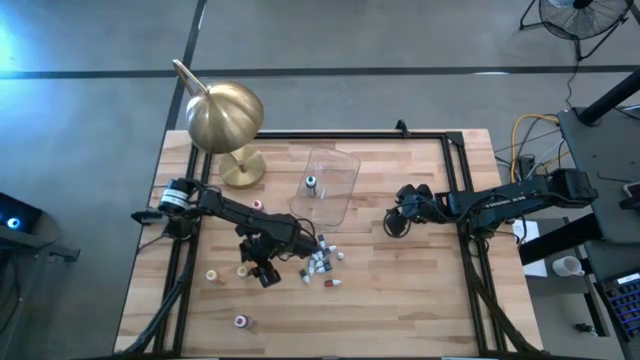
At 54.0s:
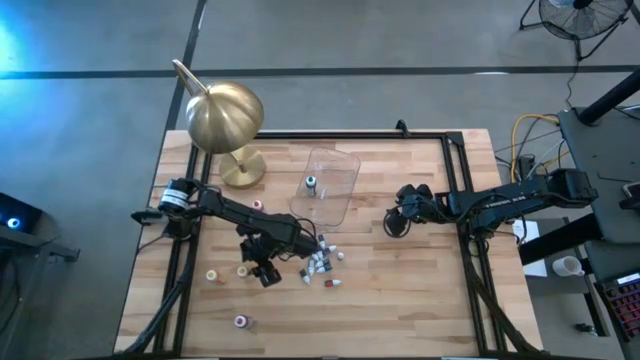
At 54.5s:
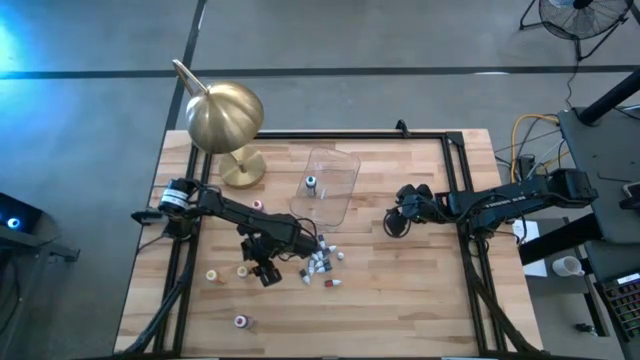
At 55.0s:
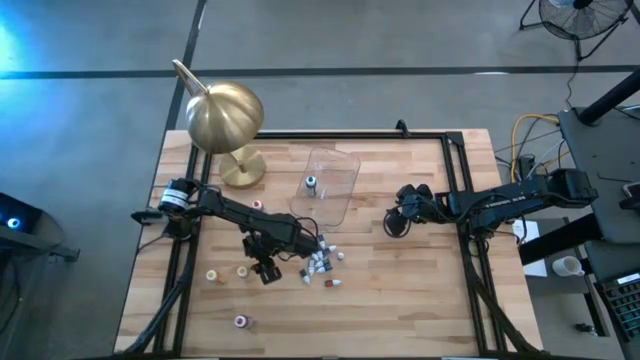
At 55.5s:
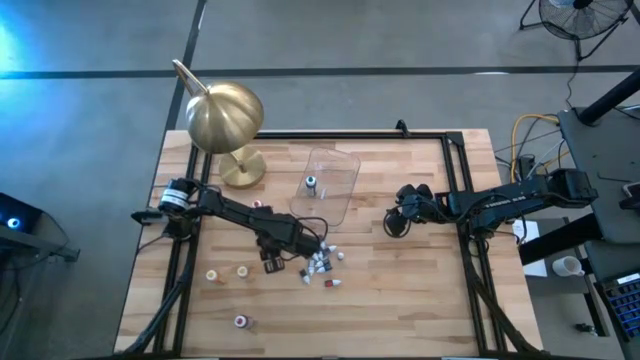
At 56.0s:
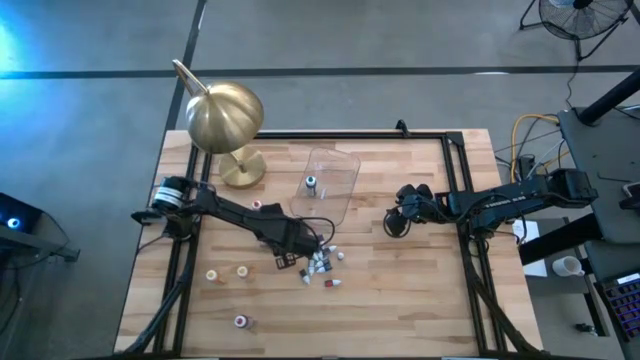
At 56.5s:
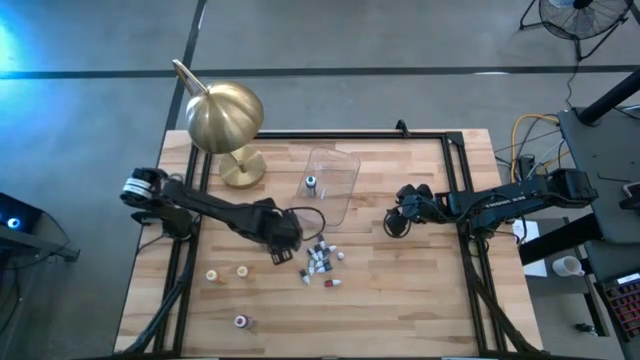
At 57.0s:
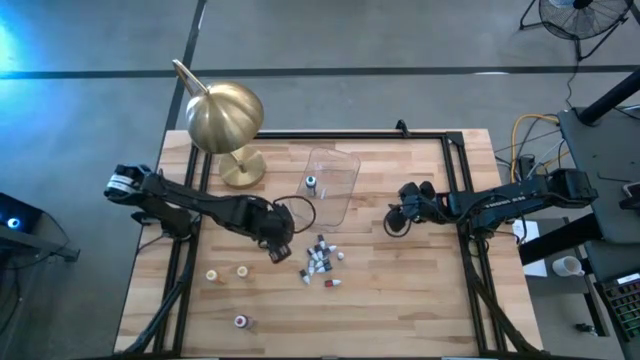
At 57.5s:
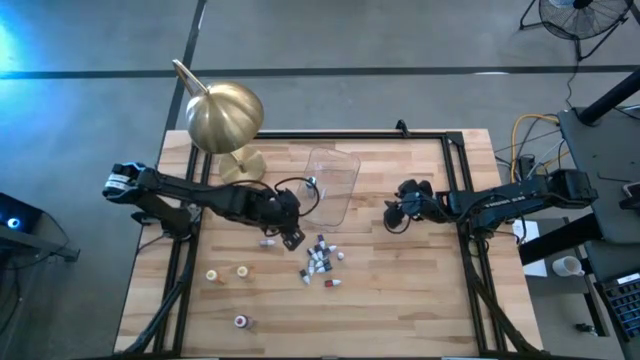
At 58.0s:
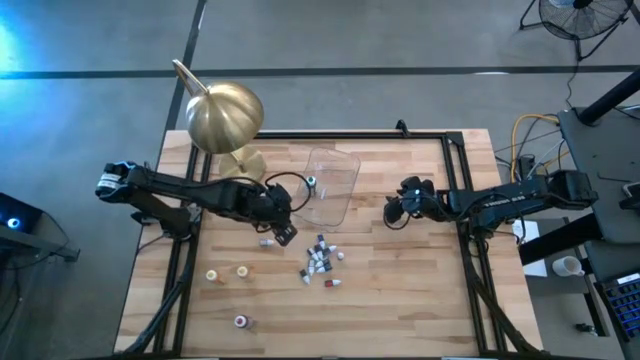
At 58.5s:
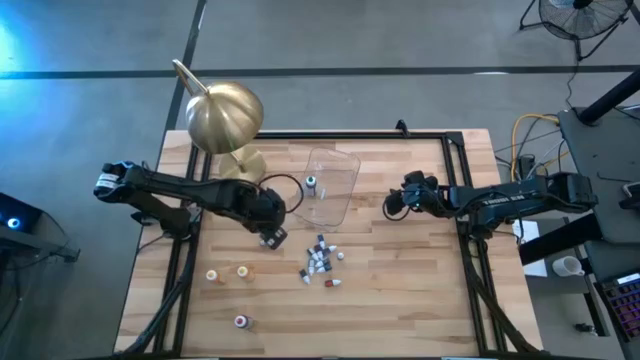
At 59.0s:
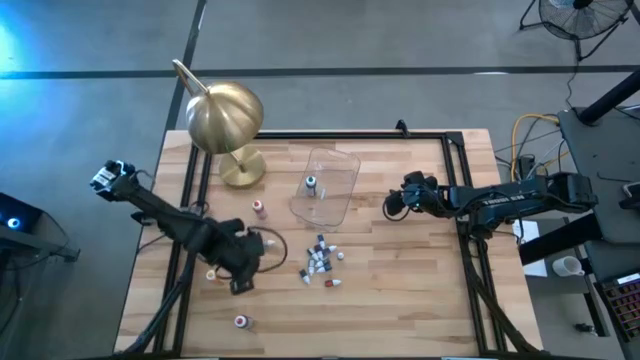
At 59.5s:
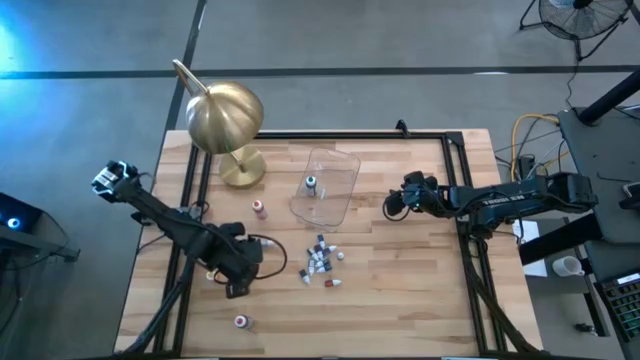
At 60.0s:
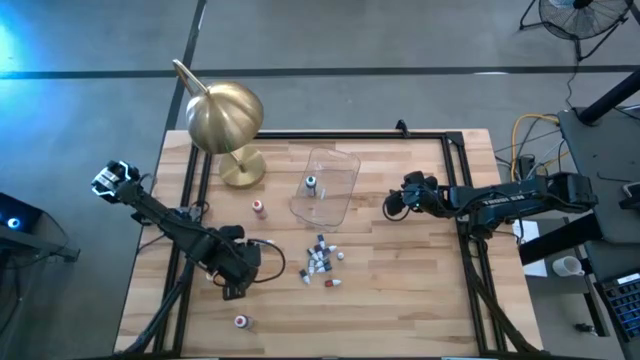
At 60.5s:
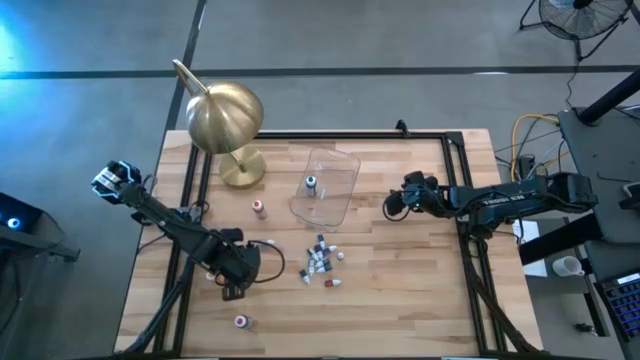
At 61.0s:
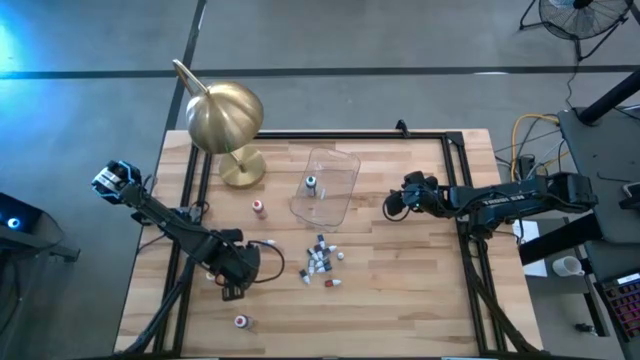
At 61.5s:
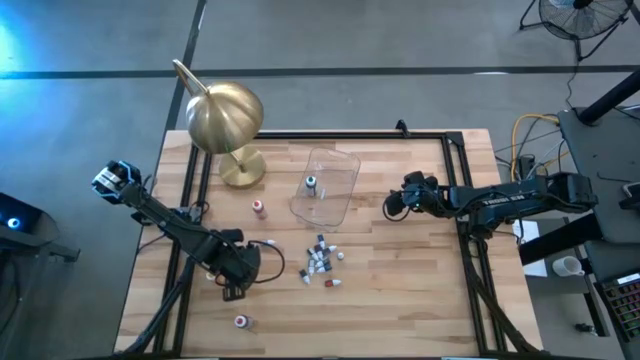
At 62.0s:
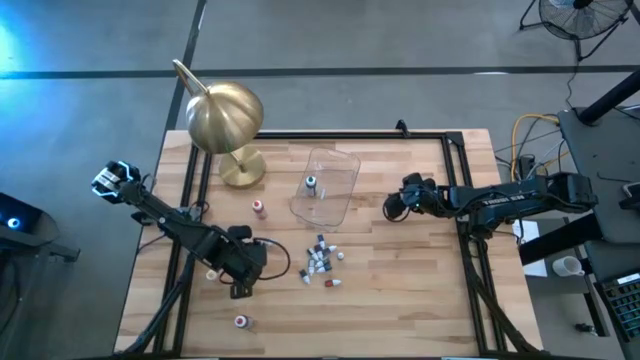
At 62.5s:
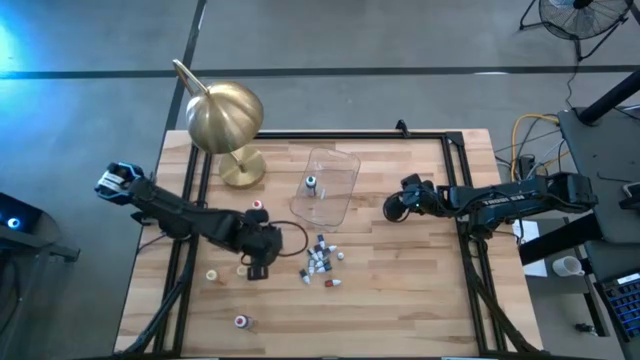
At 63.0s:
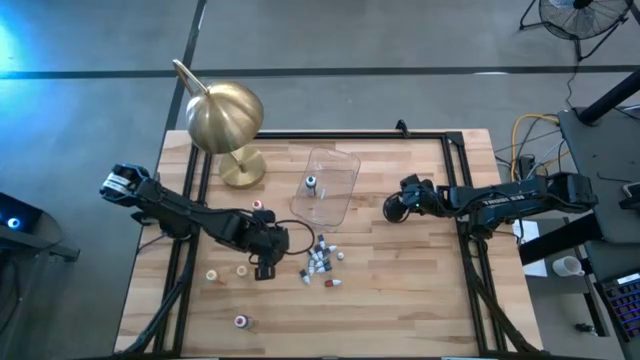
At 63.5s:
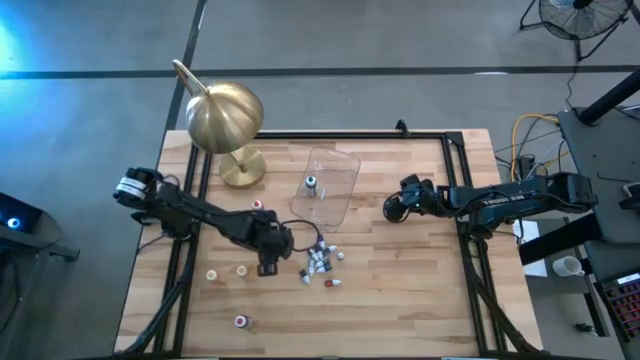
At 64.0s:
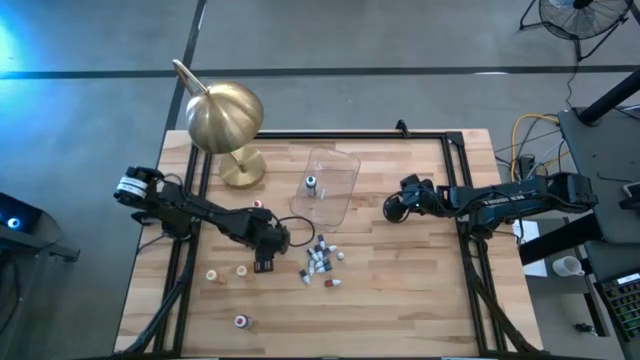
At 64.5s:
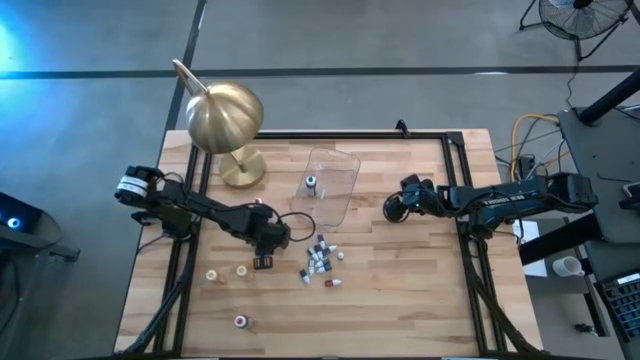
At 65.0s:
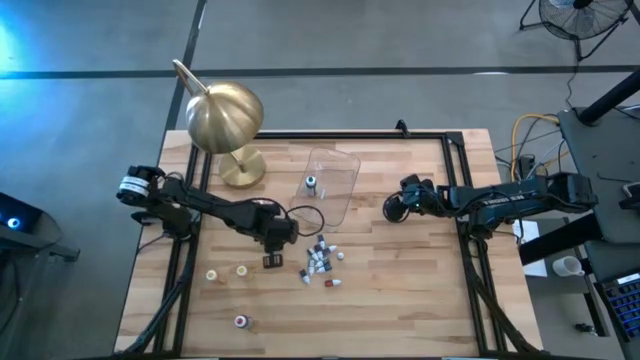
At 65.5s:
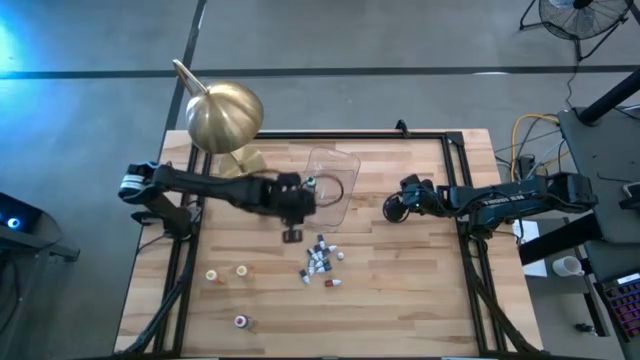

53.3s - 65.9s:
Task: Pick & Place food coloring
Put the top small red food coloring bottle into the transparent bin

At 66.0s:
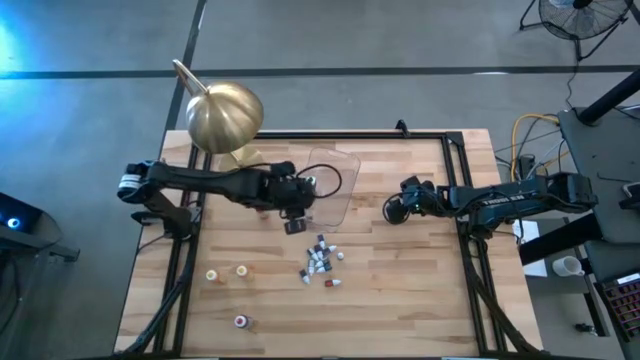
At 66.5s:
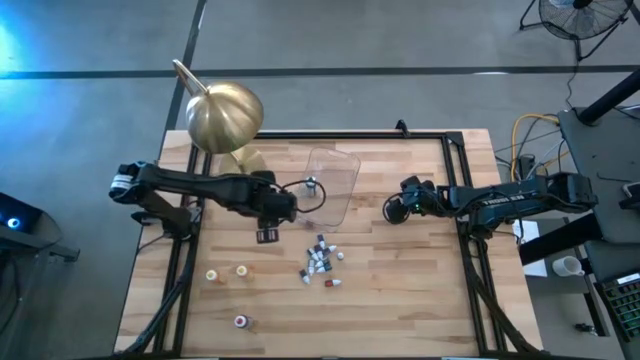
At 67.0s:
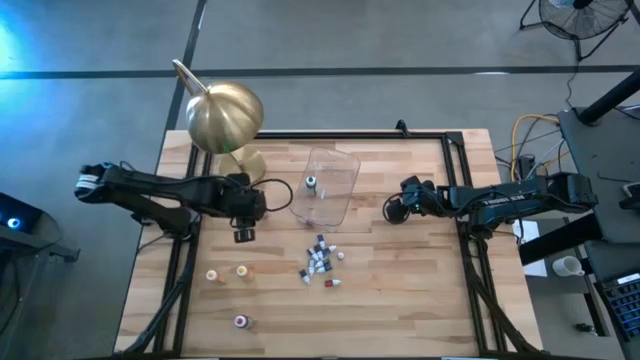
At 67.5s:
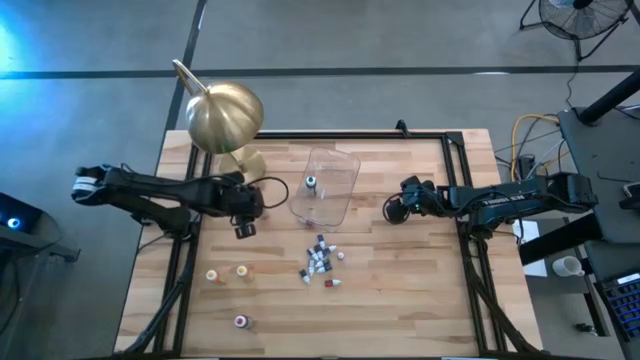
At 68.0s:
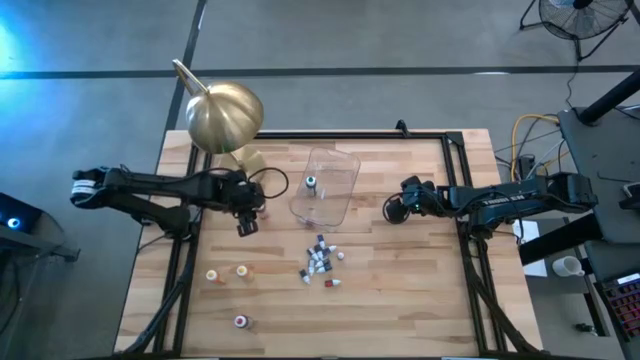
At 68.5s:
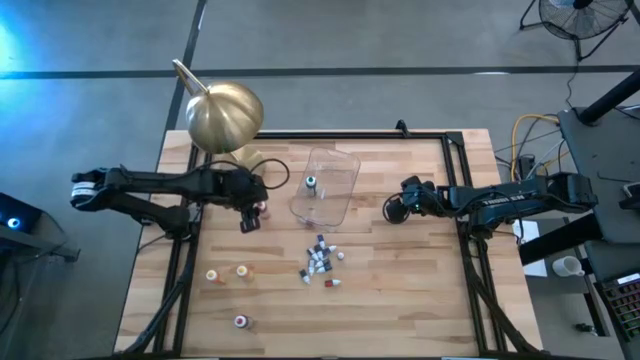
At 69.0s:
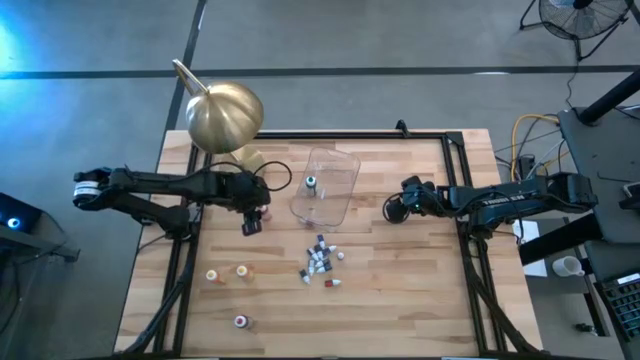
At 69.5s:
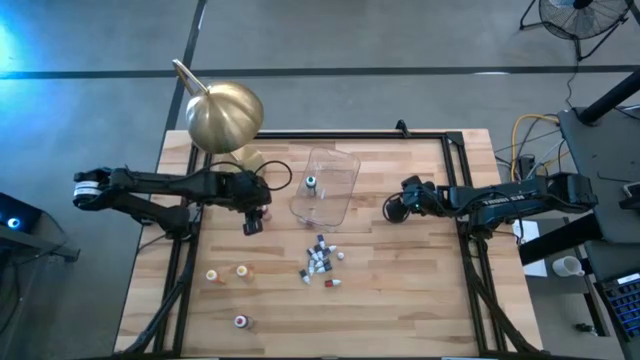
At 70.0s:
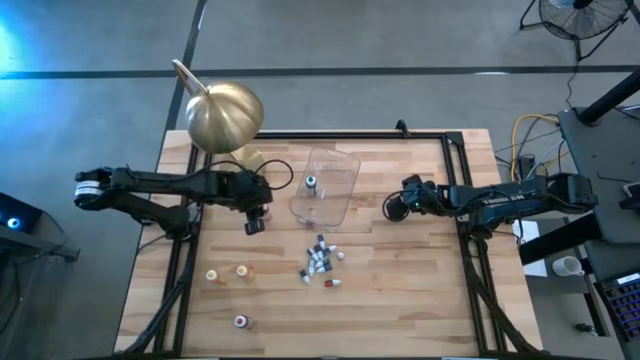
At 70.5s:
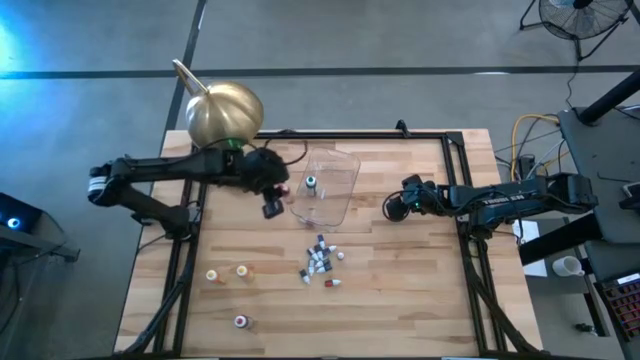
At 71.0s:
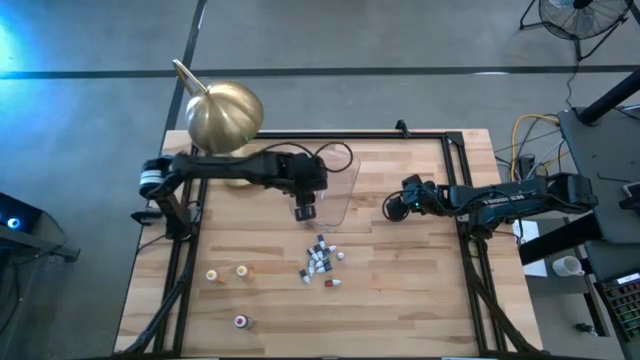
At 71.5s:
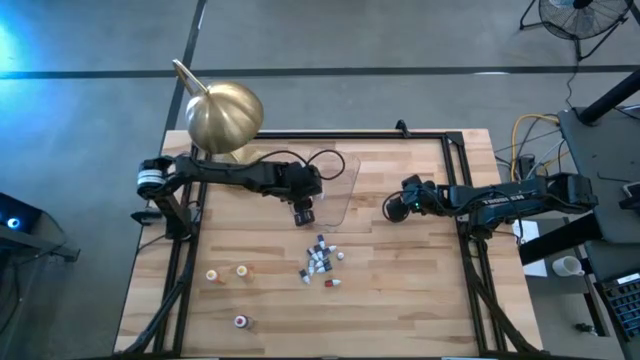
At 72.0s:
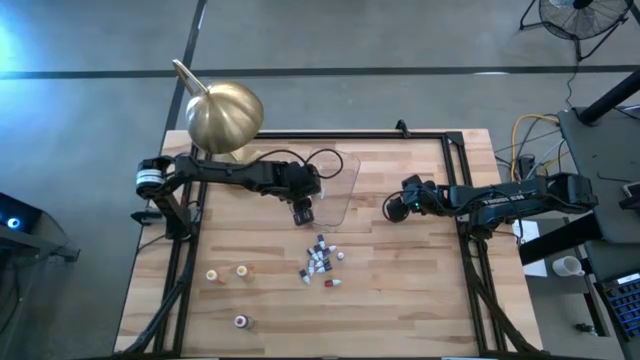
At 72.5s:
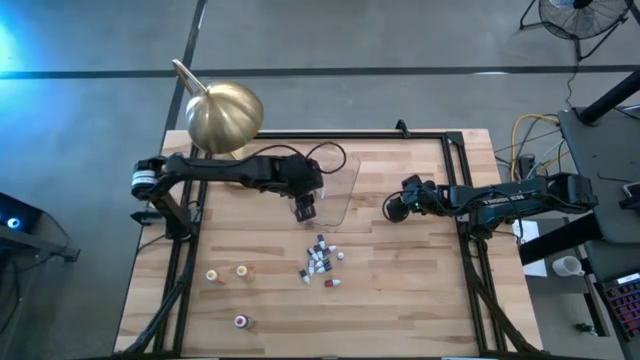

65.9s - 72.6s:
Put the large orange food coloring bottle into the transparent bin

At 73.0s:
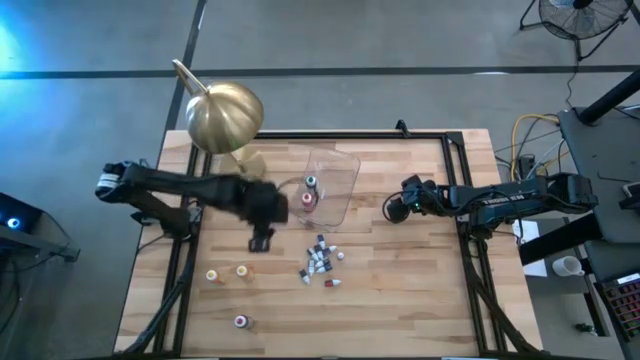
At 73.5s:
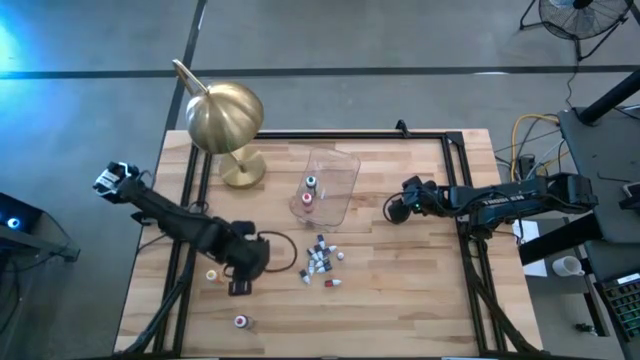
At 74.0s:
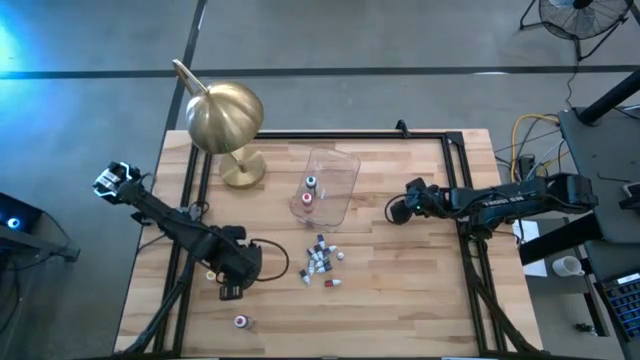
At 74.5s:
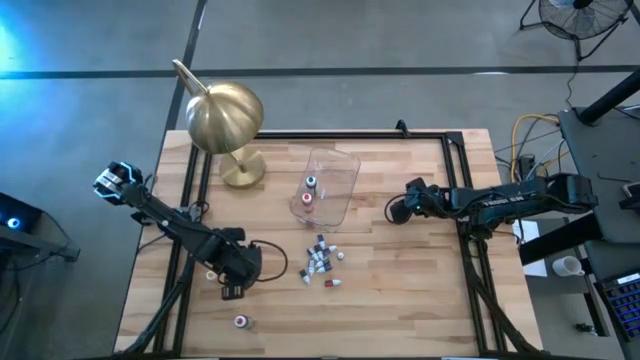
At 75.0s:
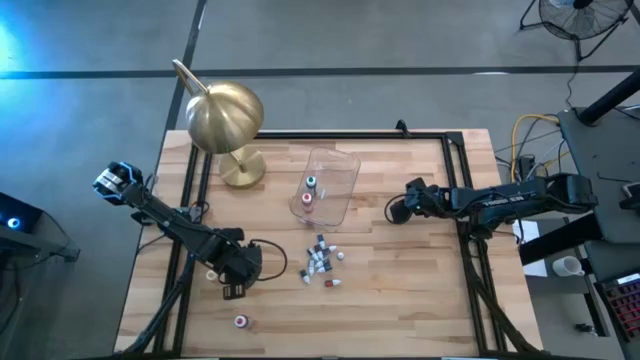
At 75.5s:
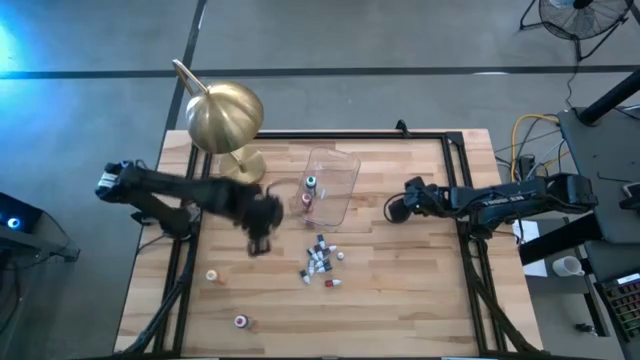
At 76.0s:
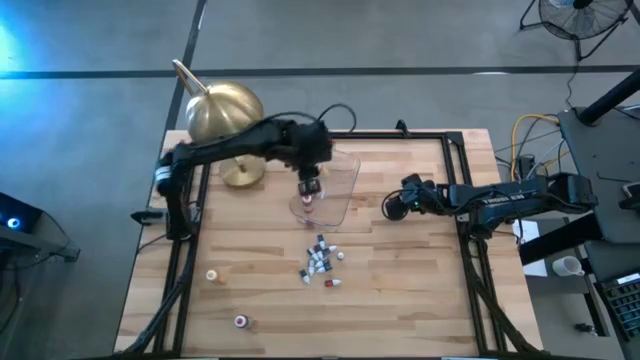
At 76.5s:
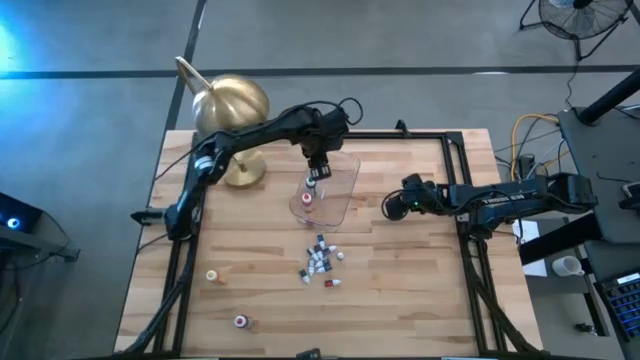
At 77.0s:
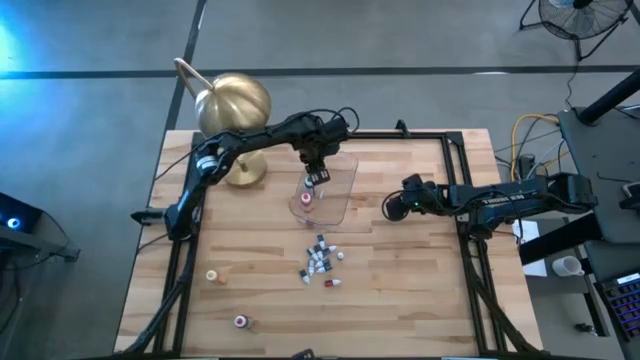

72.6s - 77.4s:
Put the right large yellow food coloring bottle into the transparent bin
